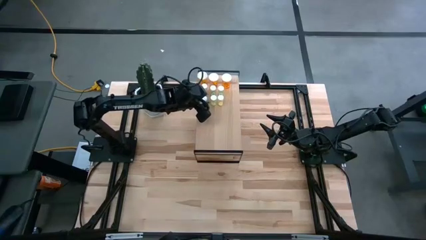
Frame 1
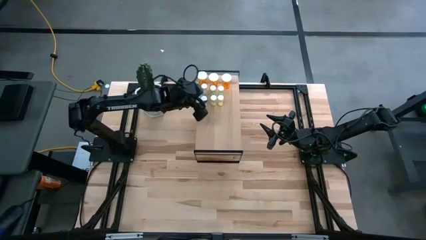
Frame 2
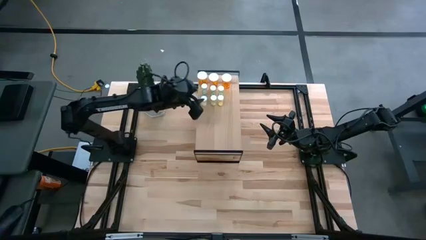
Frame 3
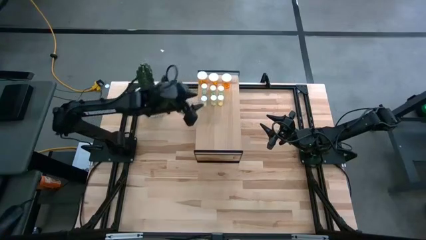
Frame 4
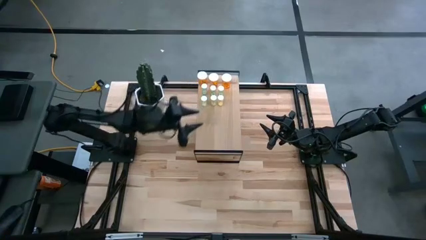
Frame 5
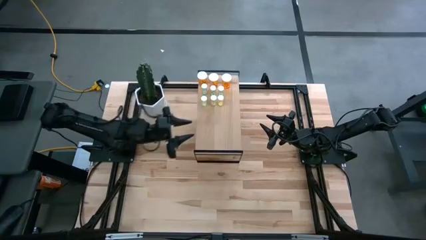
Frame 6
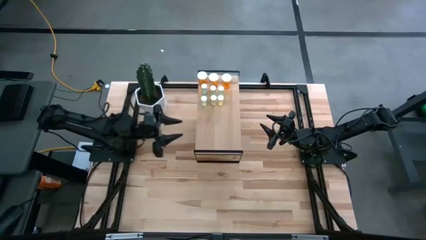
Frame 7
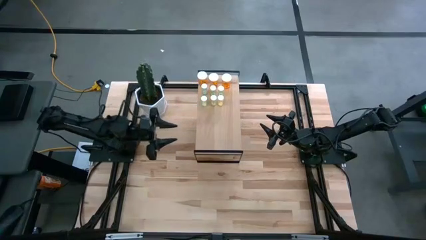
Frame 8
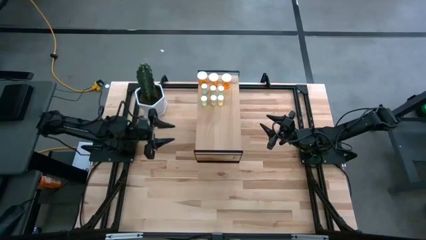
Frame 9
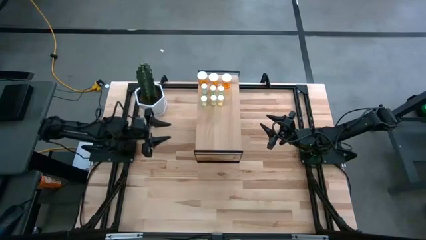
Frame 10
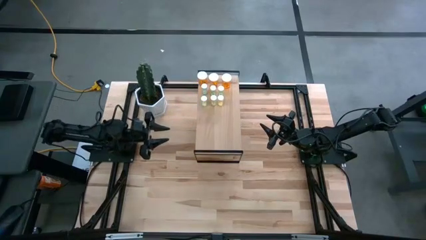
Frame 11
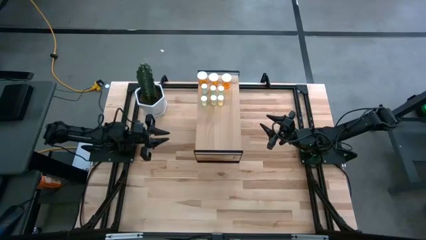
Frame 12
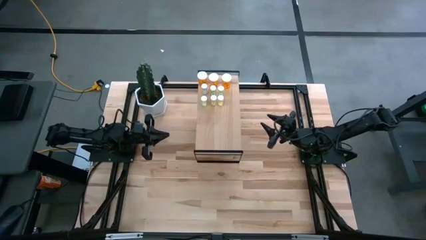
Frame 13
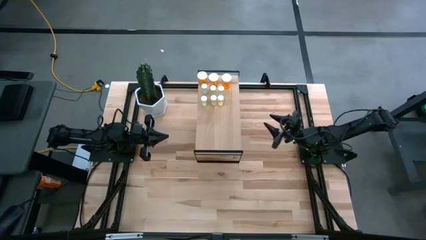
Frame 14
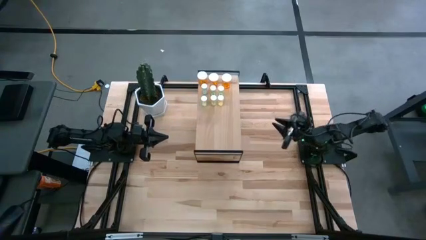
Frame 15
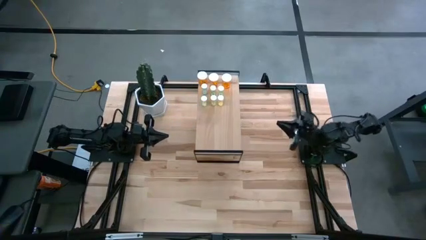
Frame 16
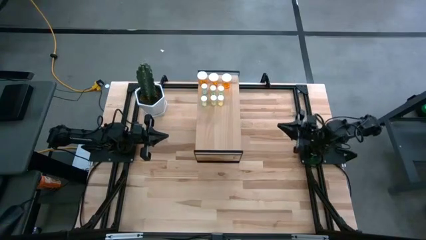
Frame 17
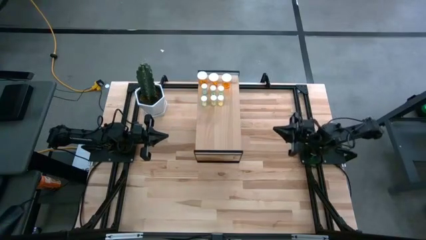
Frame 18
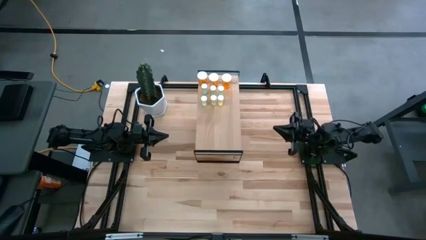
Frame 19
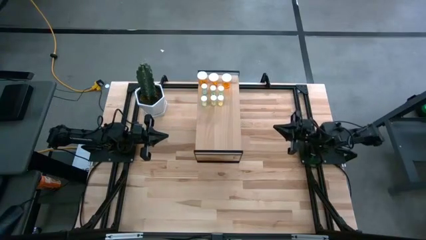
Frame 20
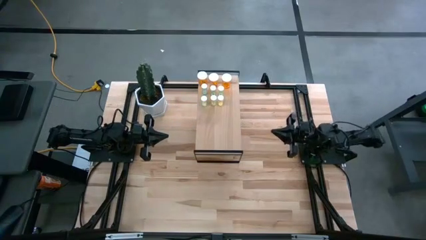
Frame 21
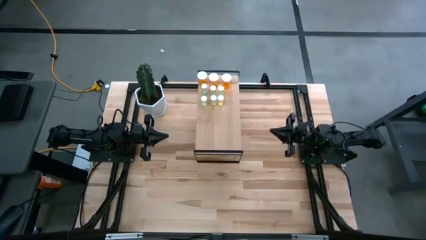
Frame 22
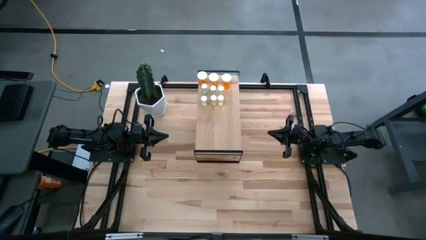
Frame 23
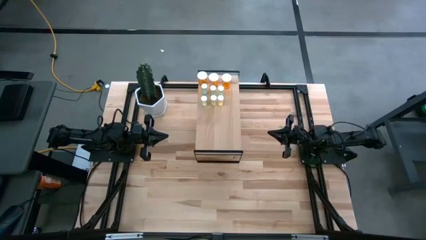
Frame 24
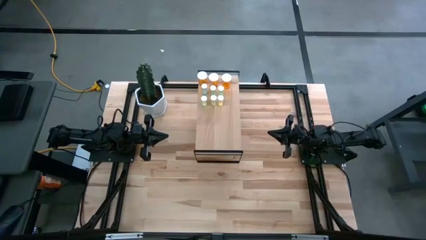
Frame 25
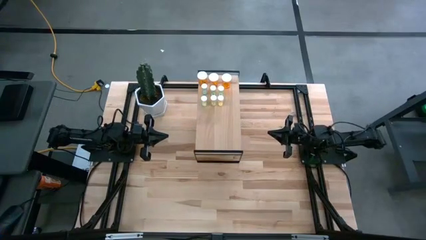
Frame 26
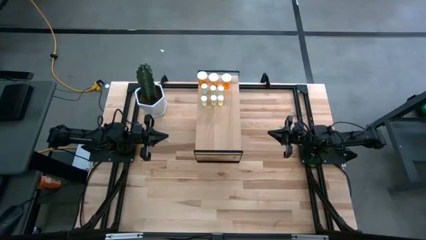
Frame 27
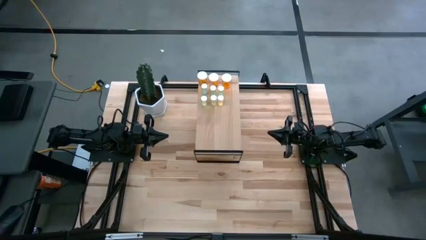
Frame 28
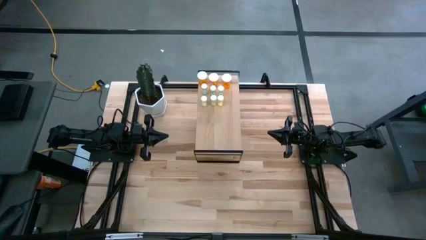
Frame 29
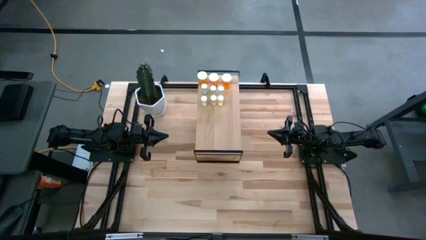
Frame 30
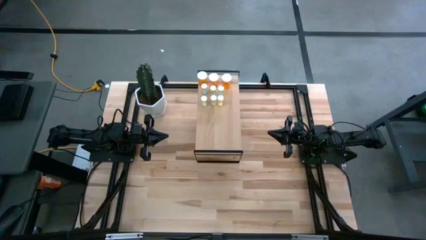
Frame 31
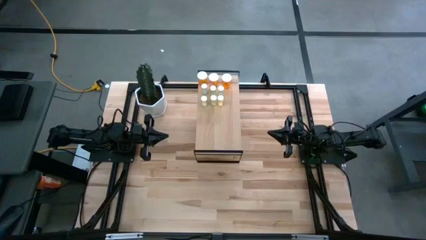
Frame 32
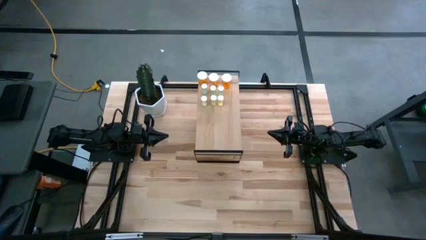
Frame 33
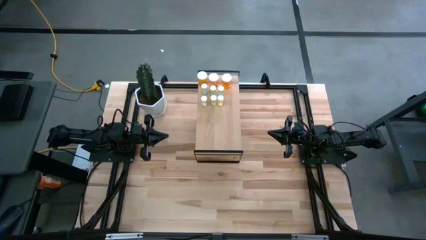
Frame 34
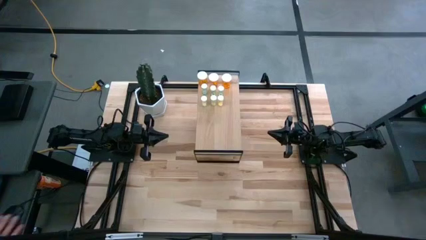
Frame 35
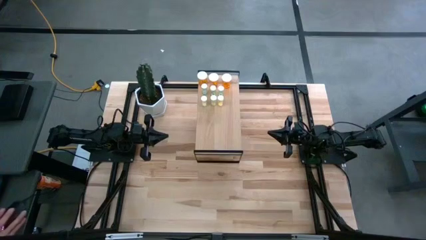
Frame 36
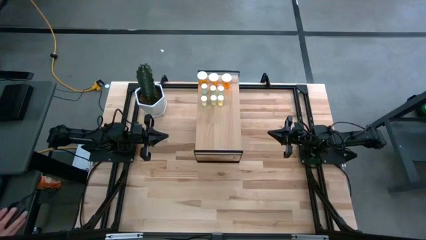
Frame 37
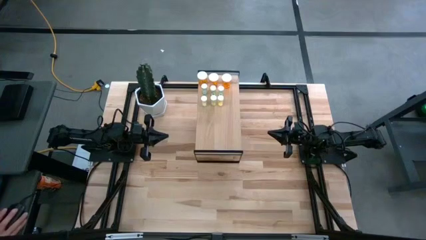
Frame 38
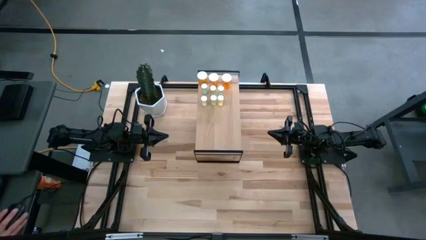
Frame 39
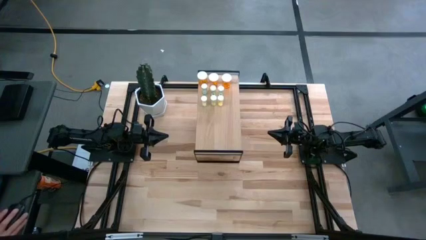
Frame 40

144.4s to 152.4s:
Task: Pick and place medicine bottles onto shelf by color
Return to Home Position

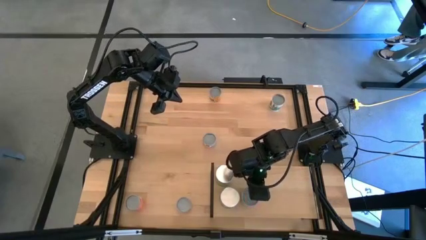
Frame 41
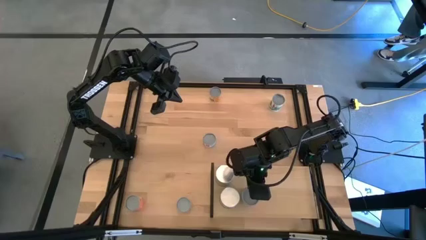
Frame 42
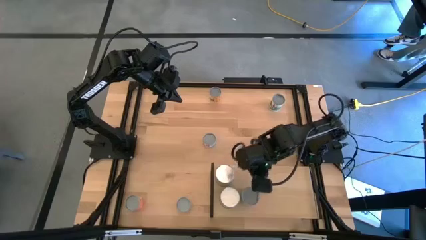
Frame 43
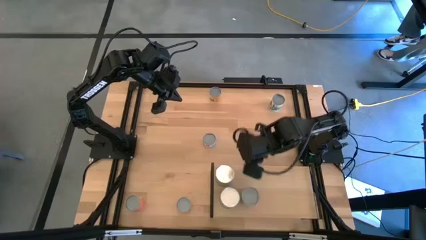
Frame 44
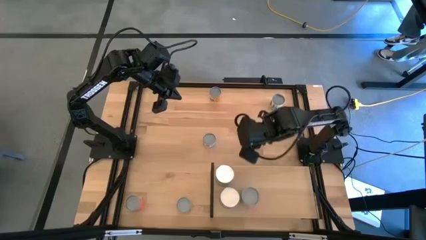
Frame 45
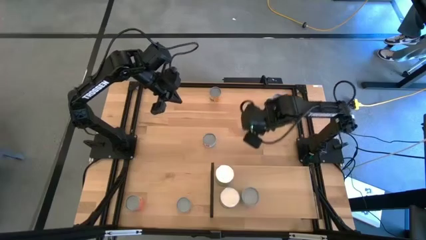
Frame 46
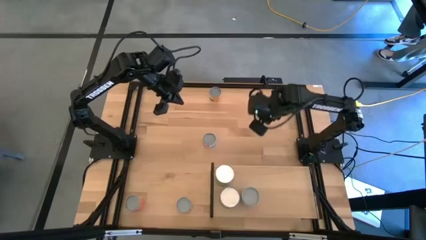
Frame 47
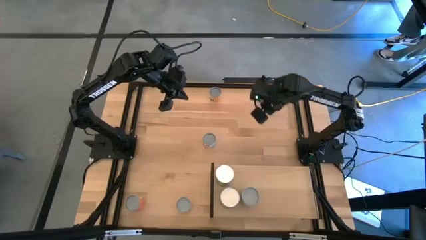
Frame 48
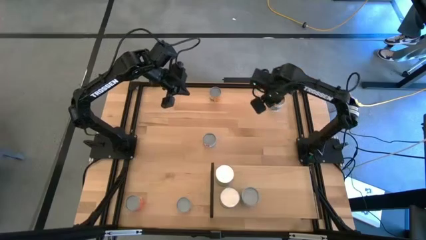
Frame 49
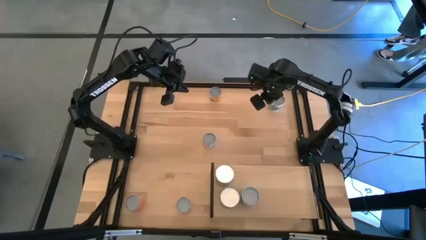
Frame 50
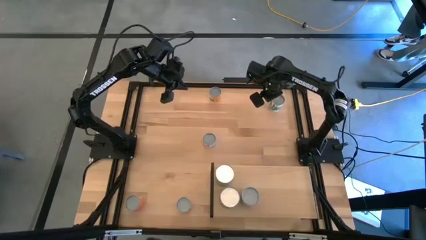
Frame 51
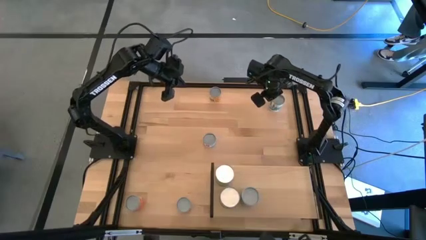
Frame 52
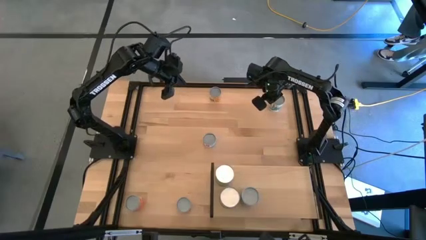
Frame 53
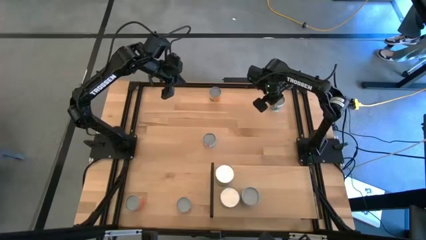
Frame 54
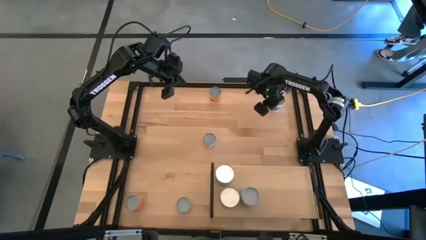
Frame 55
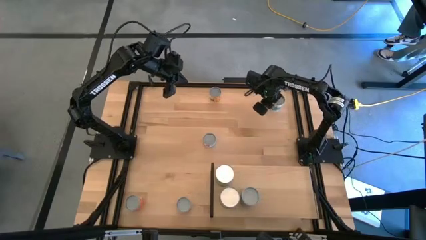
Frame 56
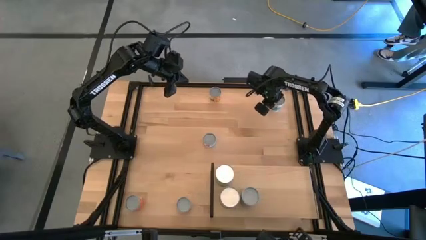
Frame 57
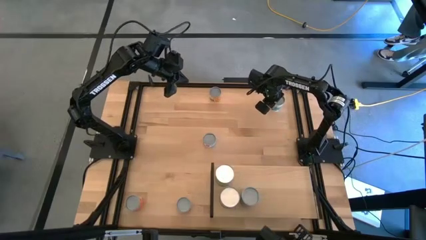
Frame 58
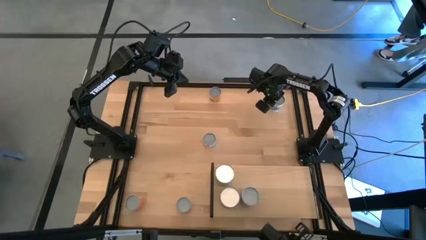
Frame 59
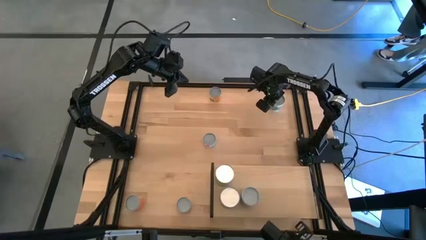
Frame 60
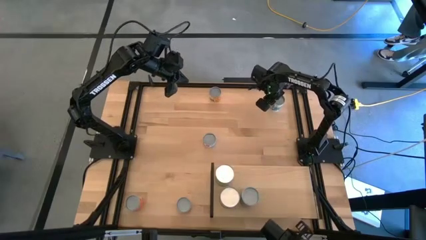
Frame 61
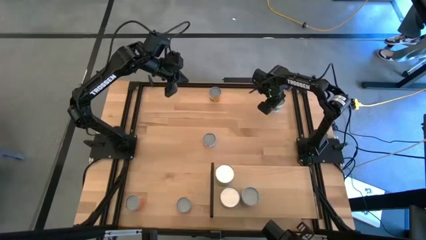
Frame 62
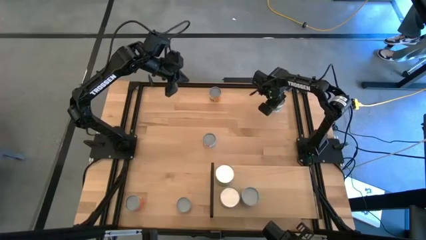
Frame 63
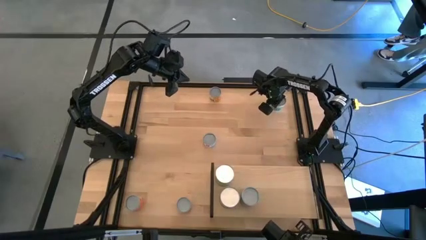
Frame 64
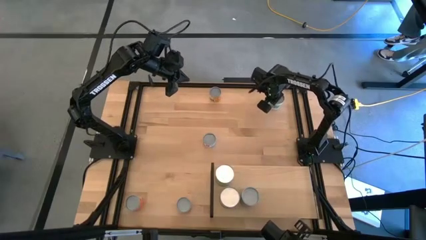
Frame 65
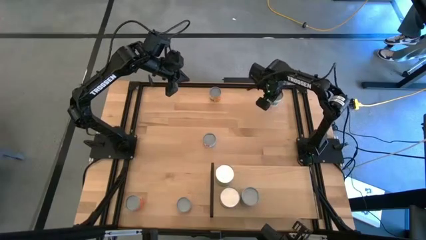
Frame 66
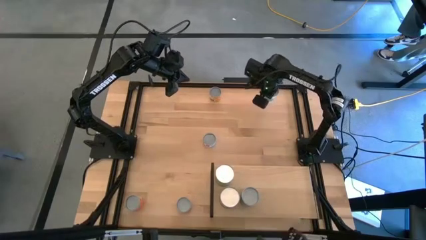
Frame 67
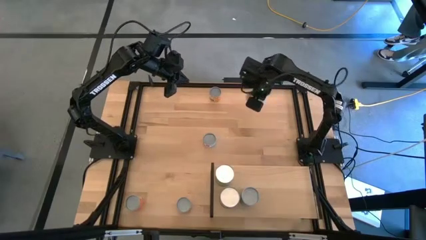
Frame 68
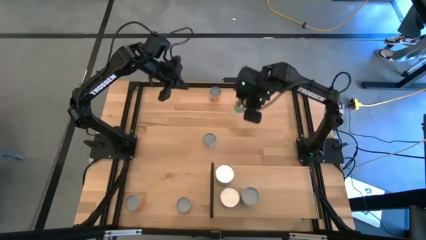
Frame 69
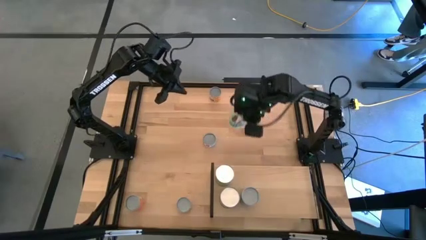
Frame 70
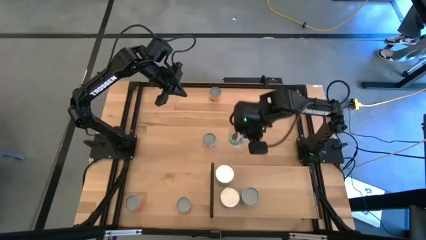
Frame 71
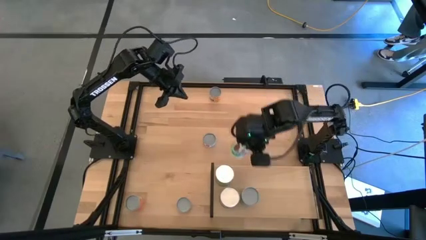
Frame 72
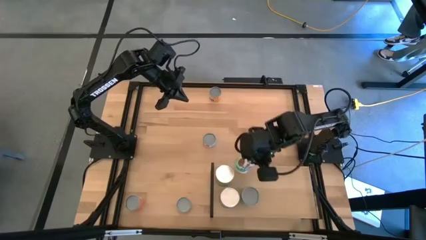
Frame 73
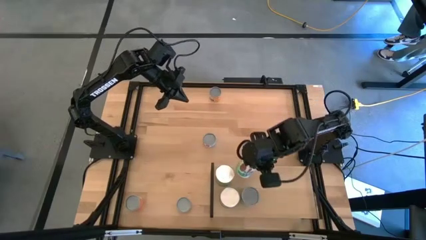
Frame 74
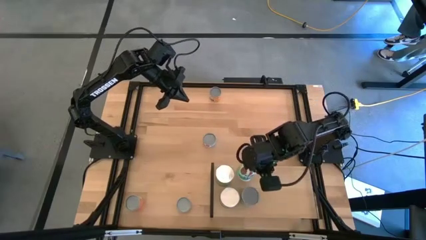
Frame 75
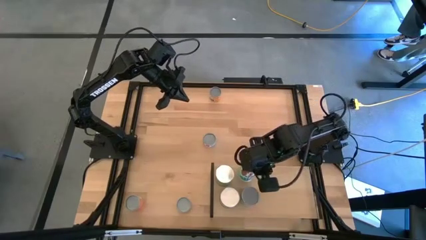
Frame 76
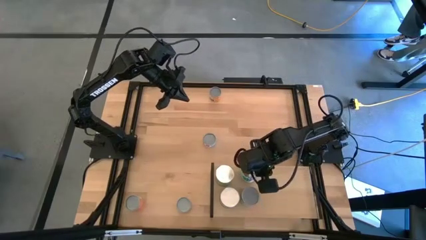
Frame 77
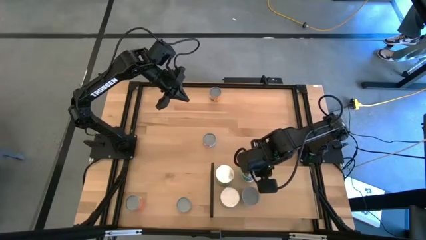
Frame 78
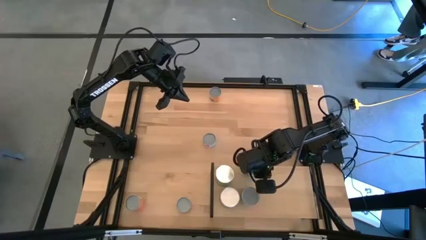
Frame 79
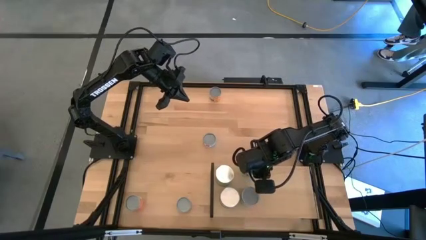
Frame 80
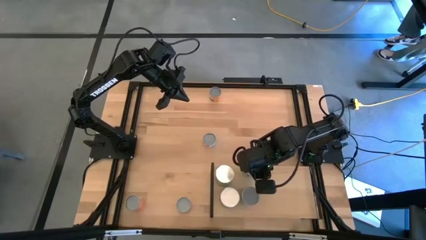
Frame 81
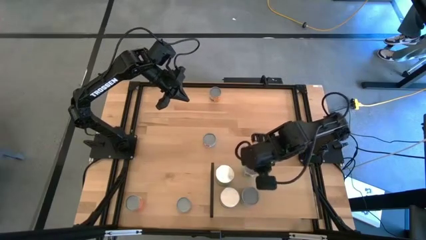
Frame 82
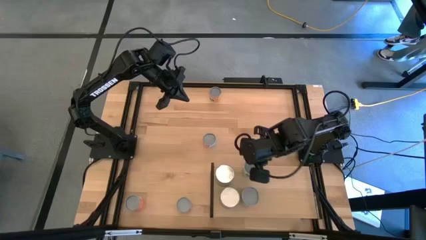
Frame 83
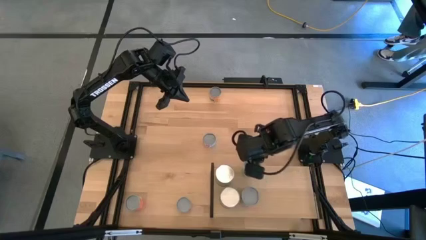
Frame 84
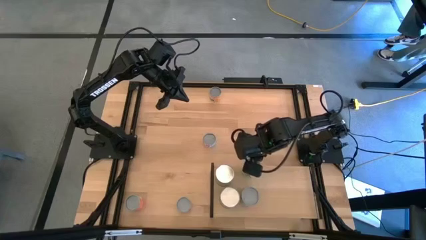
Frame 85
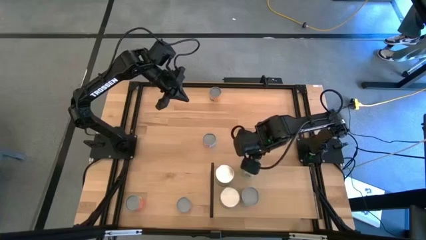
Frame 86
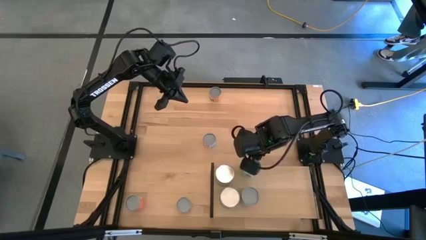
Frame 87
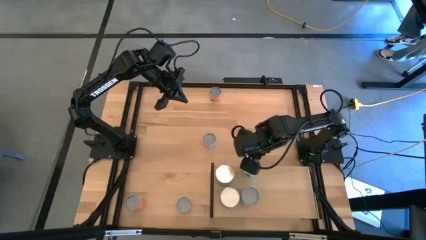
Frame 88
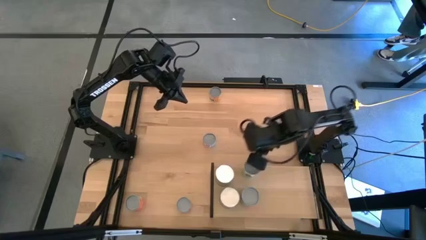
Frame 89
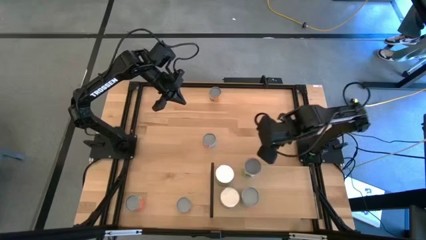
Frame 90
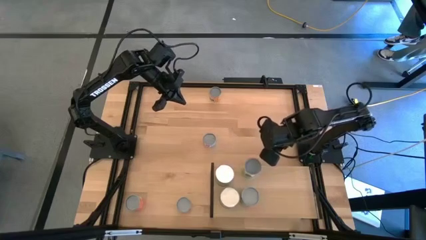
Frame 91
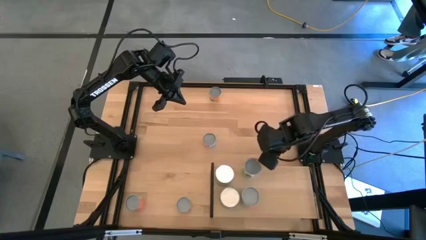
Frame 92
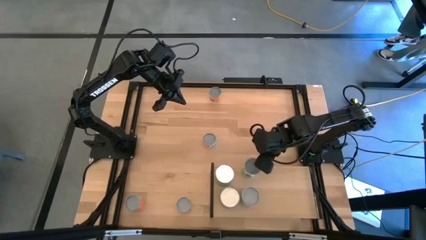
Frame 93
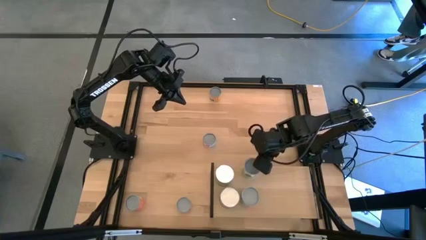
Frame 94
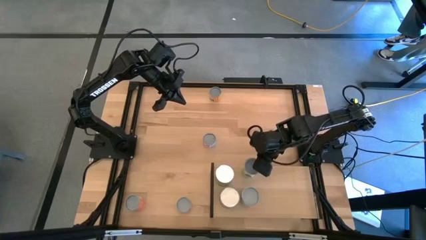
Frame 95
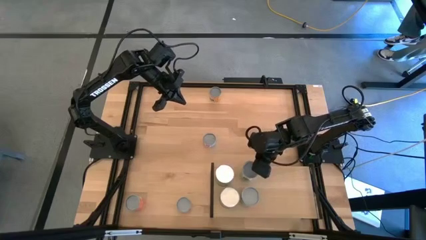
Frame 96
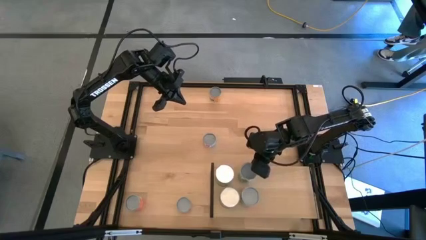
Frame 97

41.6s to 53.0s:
Task: Pick and place cans onto a shelf
Put the canned mixed vegetables on the shelf
